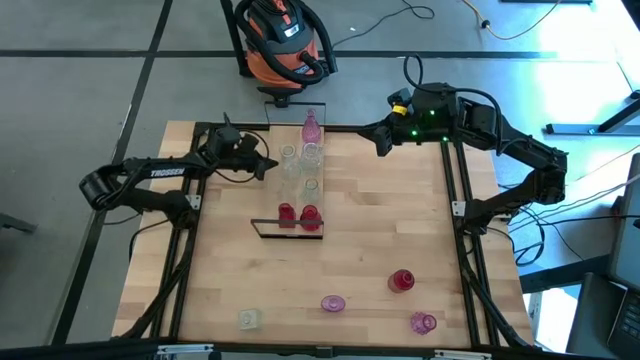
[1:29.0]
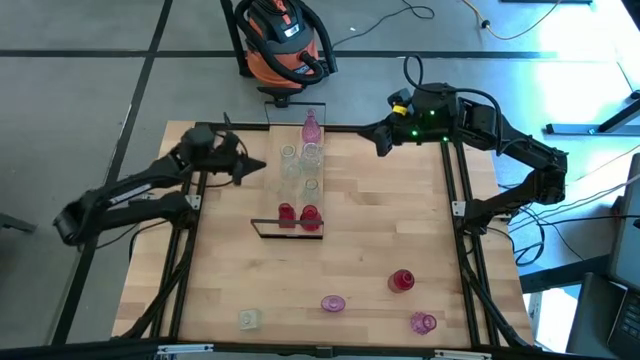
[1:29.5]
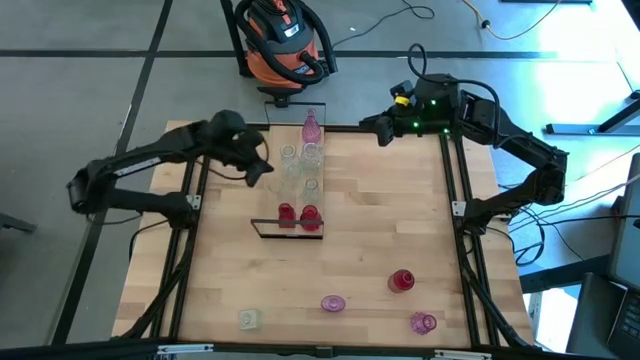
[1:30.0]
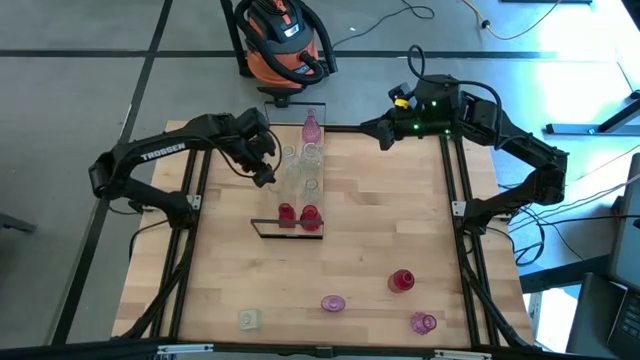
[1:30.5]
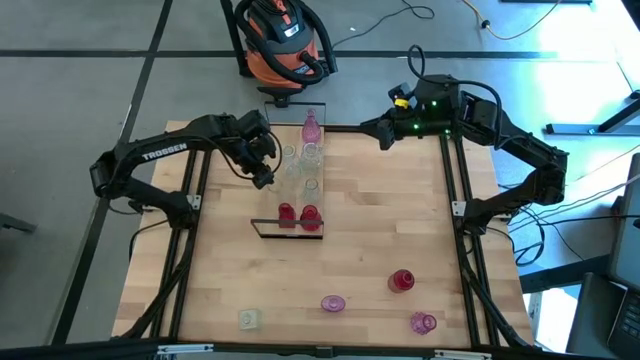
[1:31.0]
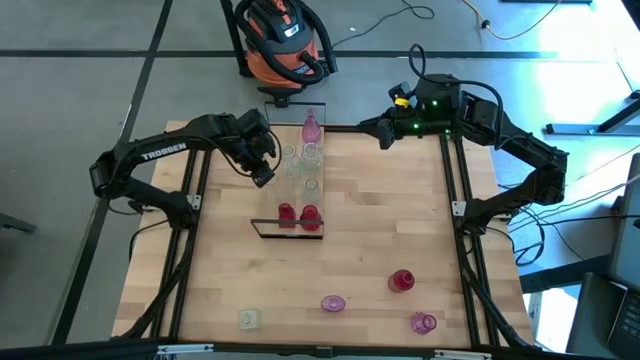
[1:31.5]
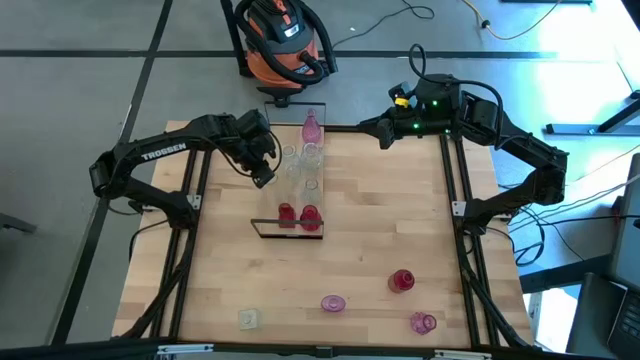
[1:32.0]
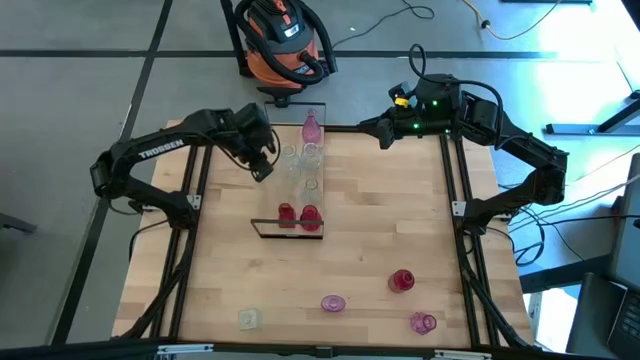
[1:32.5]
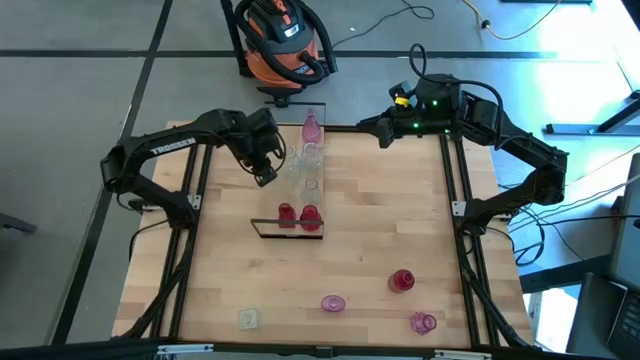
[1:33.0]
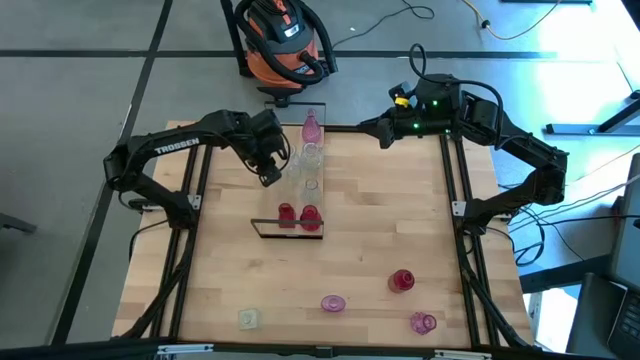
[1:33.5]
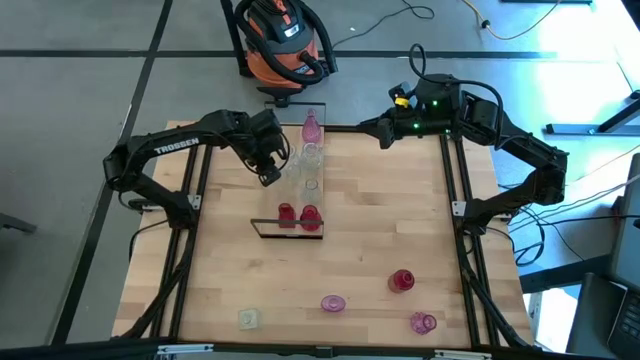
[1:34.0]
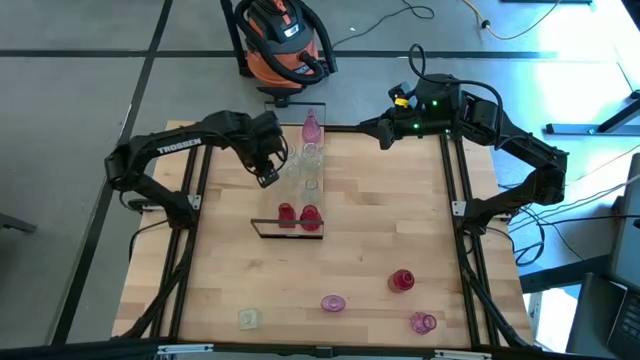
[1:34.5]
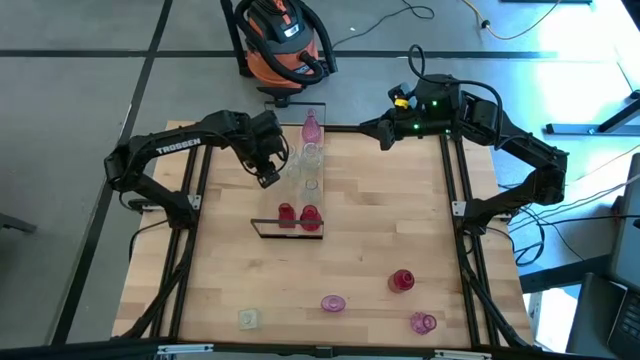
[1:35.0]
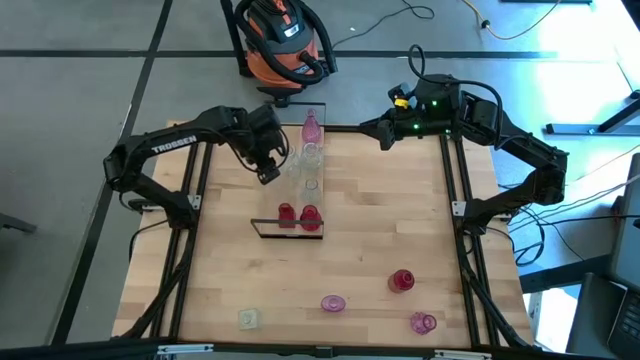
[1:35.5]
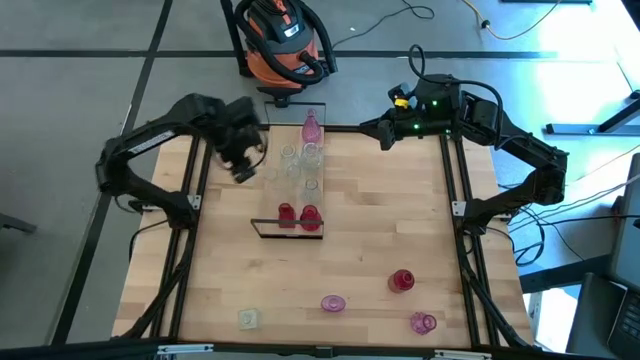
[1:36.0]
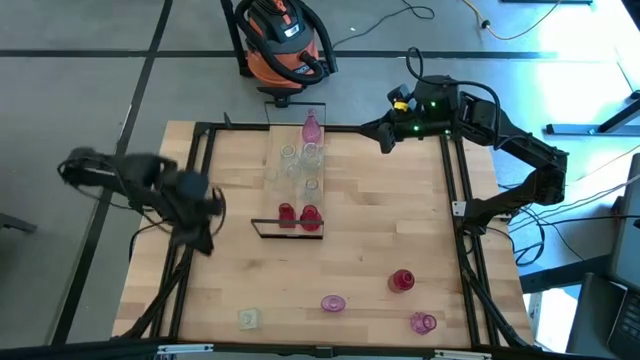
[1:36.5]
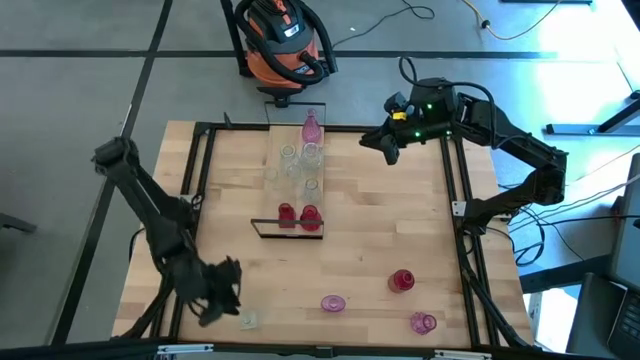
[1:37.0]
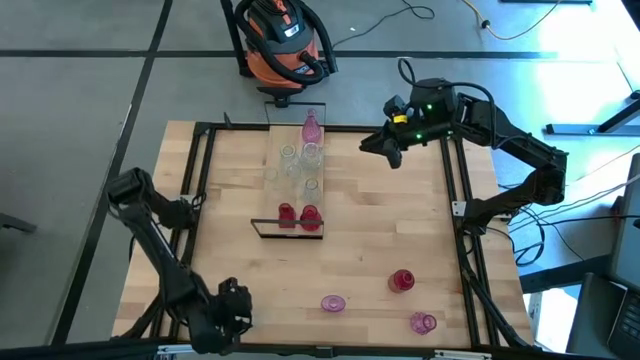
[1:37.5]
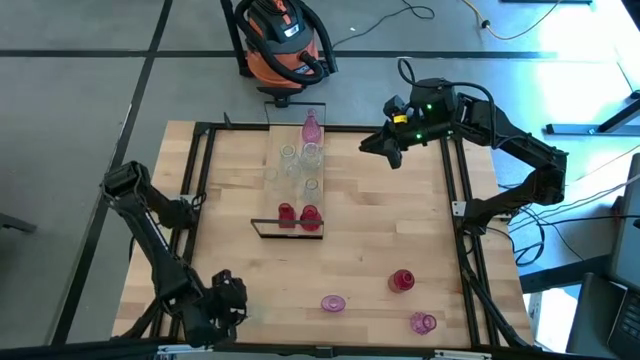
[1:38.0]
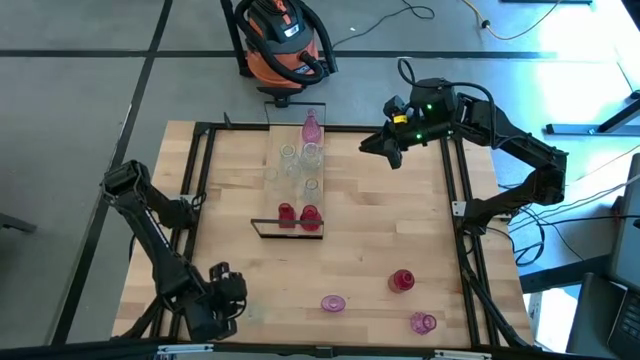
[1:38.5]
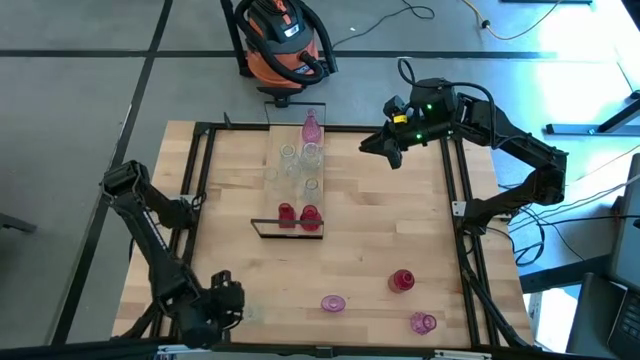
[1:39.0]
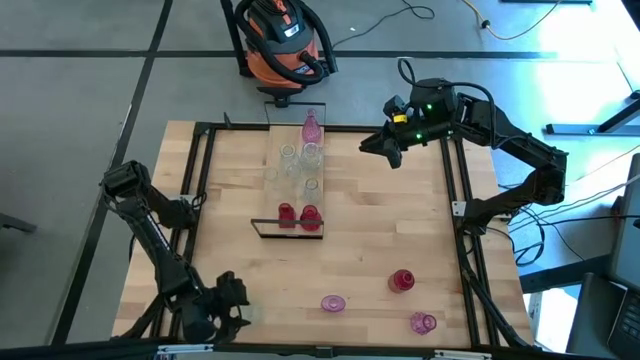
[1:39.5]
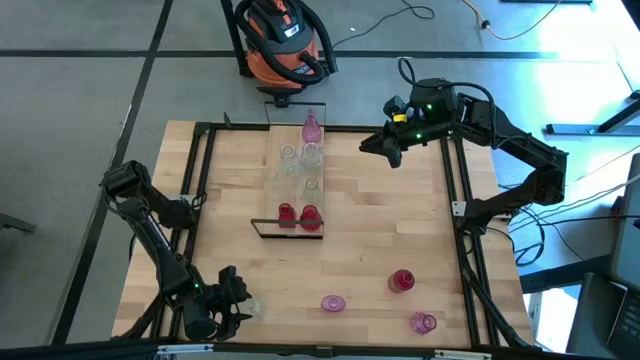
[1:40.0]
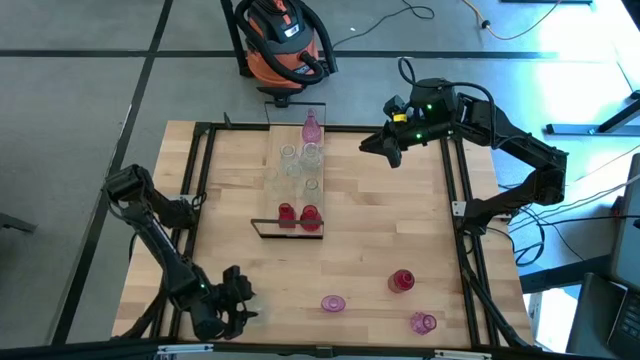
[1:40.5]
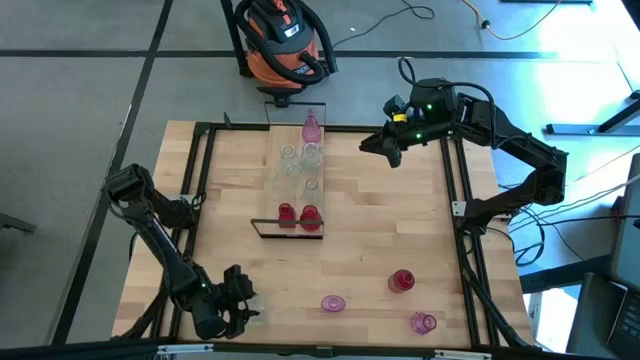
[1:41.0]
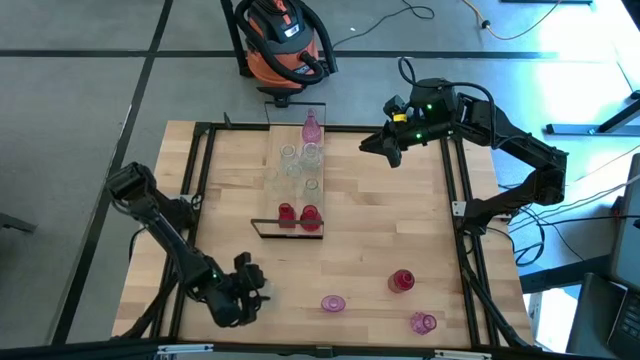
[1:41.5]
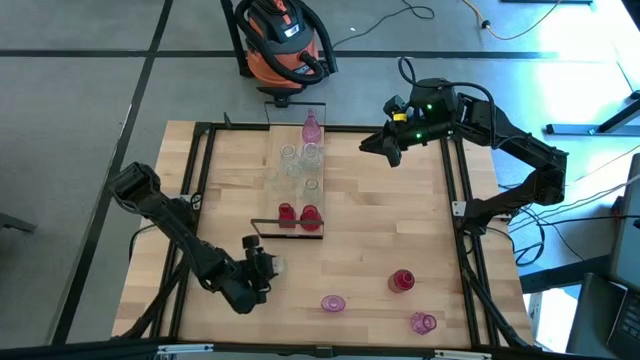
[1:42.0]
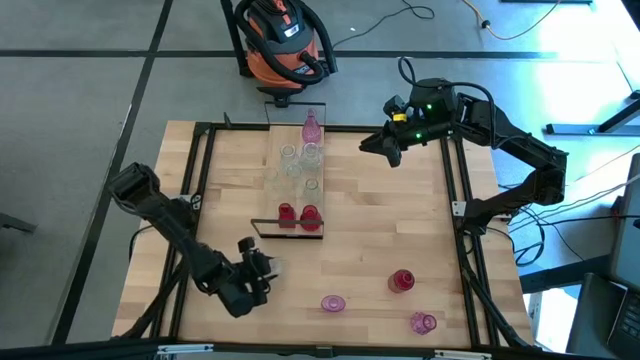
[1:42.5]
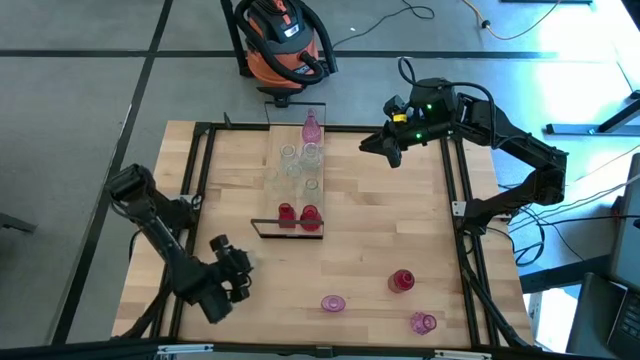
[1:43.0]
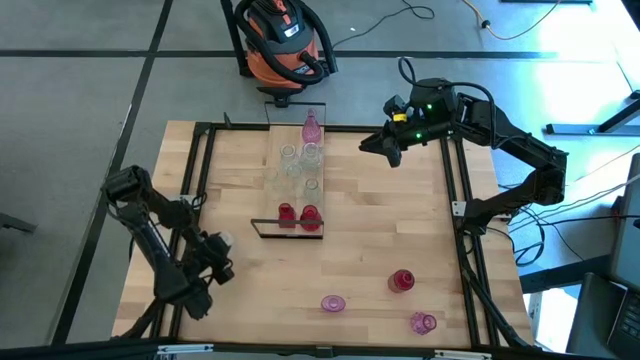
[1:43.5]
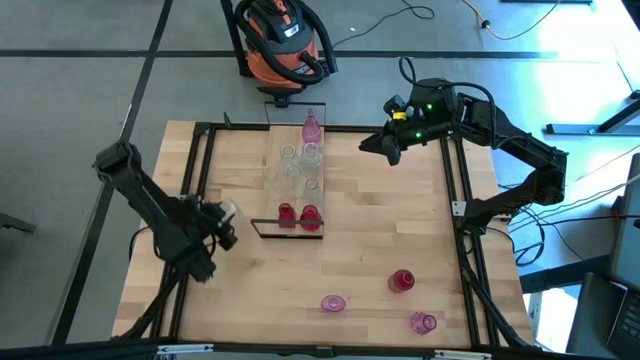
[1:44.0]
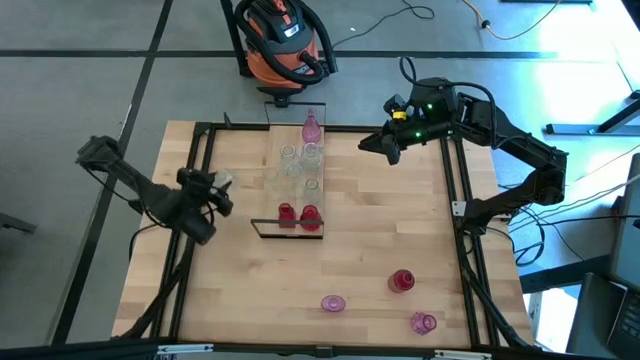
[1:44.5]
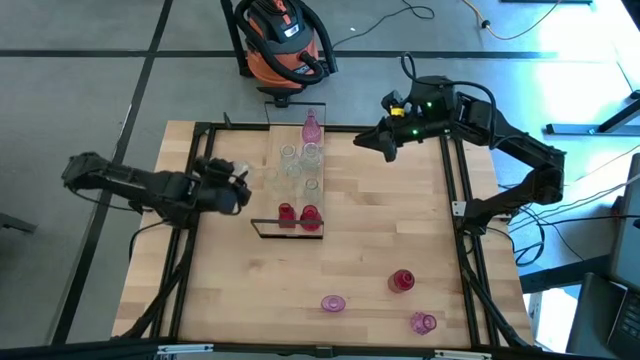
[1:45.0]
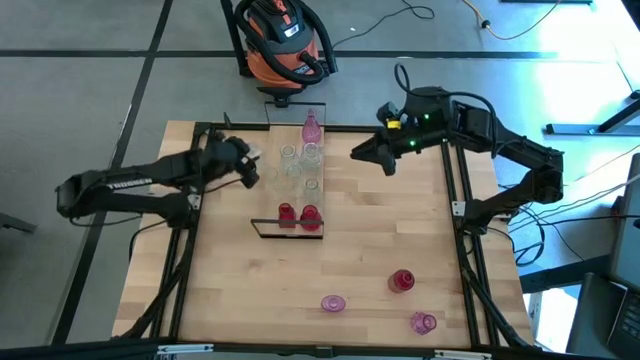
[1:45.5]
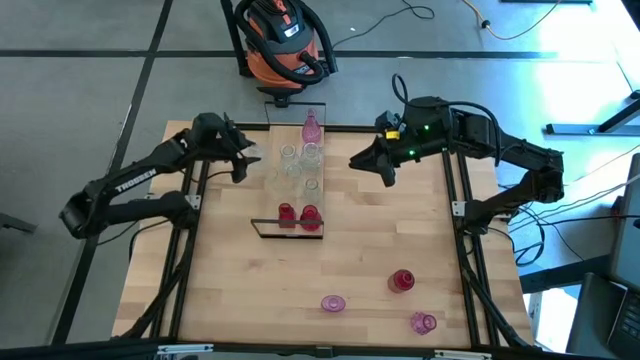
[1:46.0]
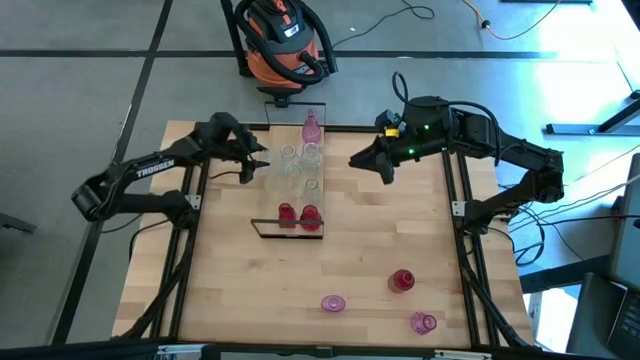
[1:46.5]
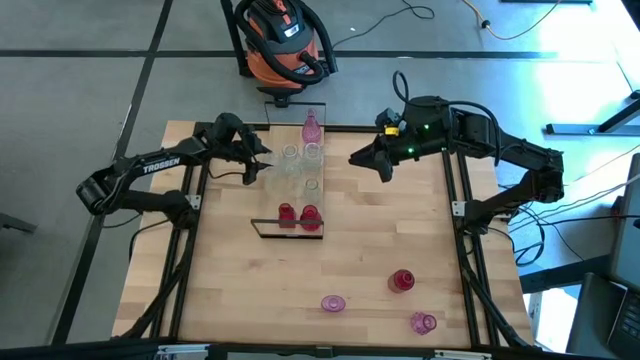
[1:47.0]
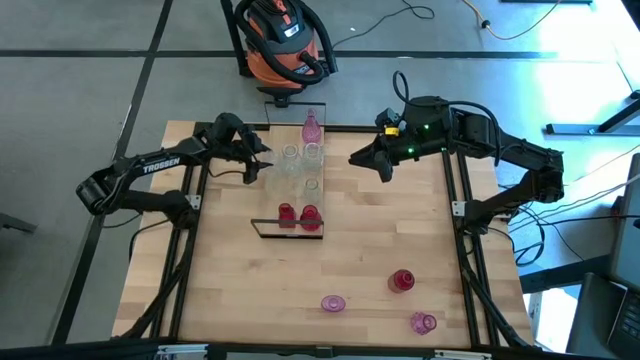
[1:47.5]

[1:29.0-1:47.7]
Task: sort vases onto shelf
Put the transparent vase on the shelf

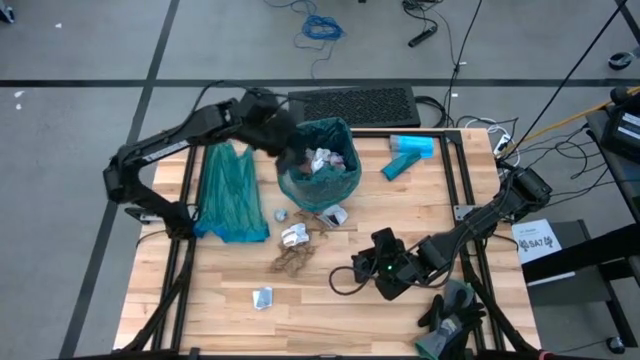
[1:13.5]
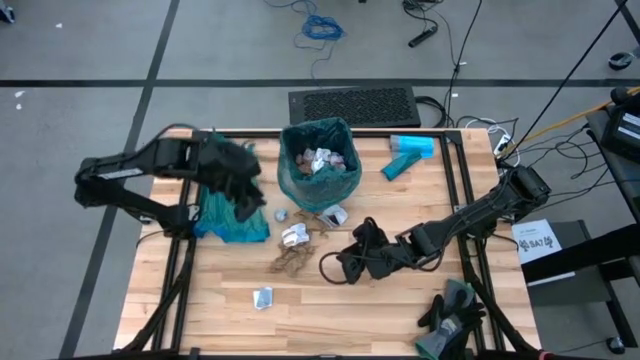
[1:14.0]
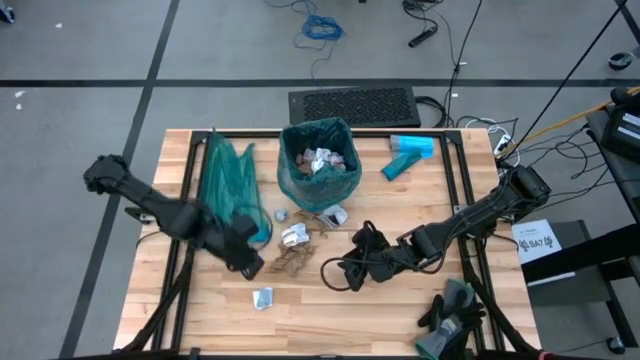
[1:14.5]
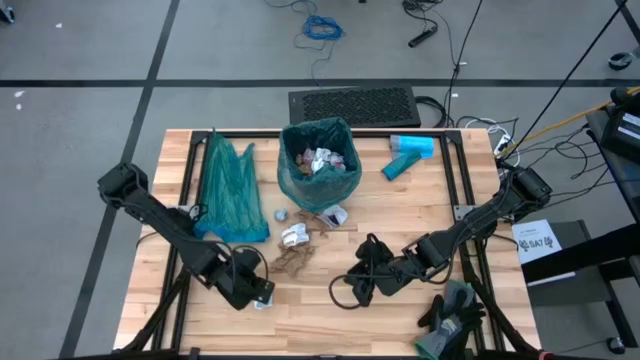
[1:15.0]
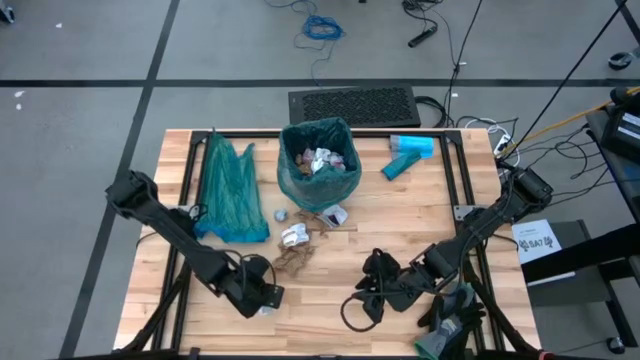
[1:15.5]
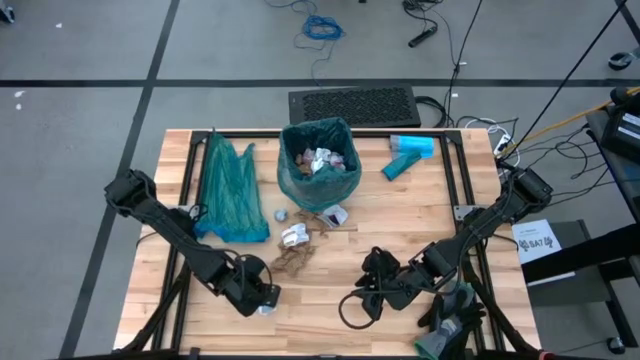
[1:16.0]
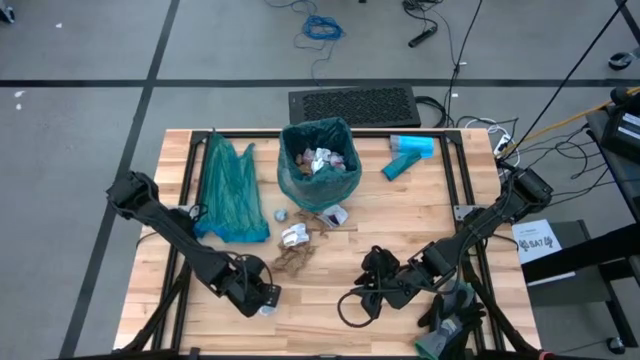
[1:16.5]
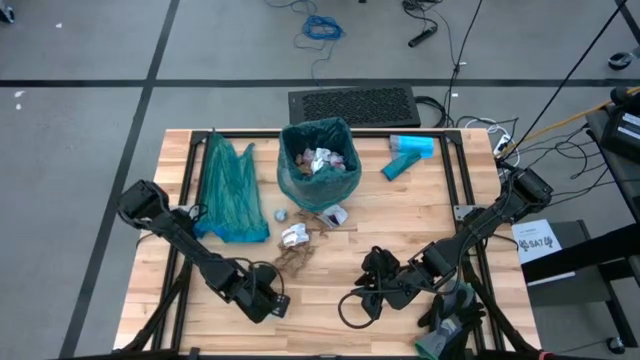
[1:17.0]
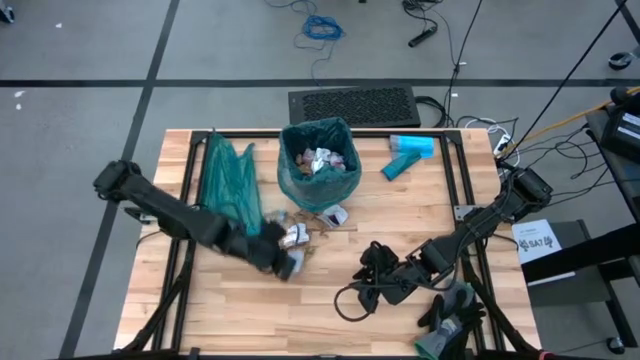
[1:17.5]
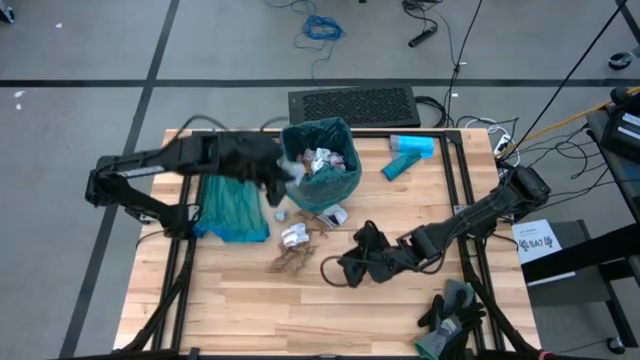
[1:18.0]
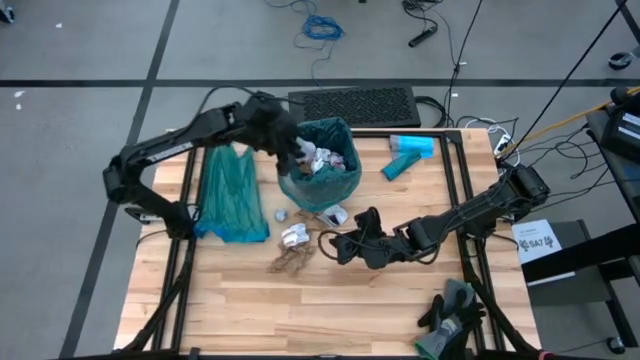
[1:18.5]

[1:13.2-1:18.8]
Task: place trash/remove bag and relplace
Put the white paper into the blue trash bag inside the black trash bin
